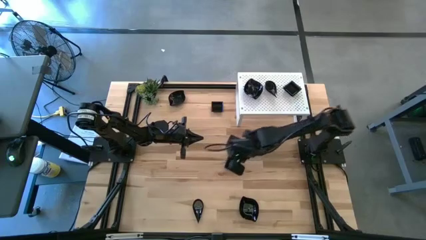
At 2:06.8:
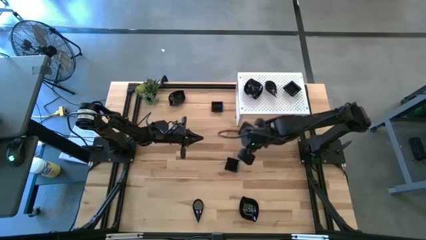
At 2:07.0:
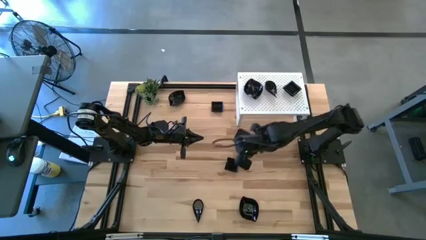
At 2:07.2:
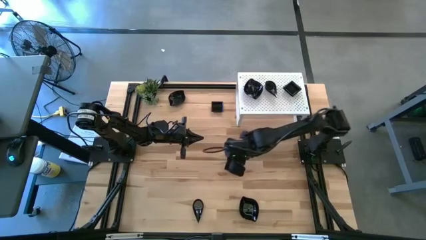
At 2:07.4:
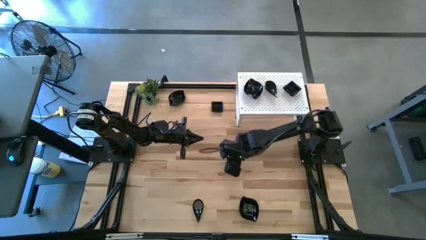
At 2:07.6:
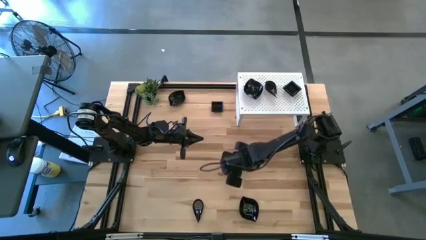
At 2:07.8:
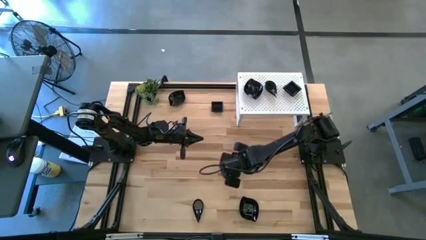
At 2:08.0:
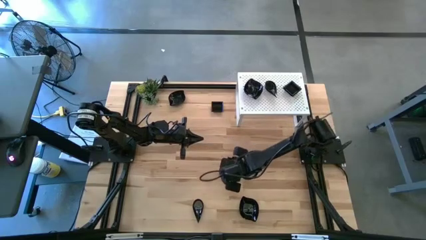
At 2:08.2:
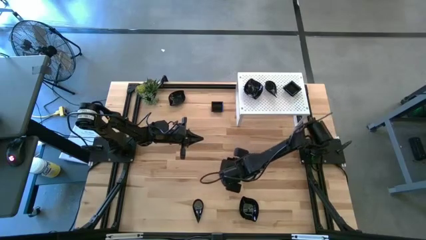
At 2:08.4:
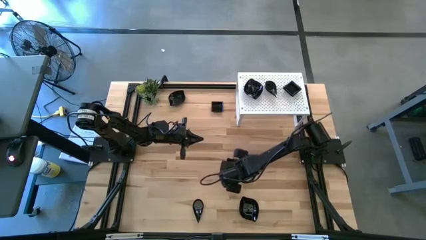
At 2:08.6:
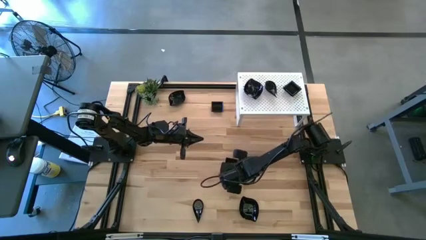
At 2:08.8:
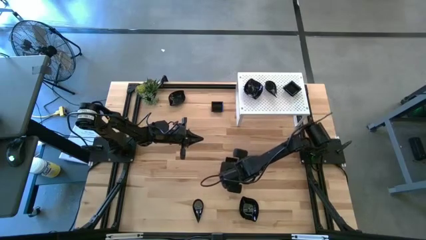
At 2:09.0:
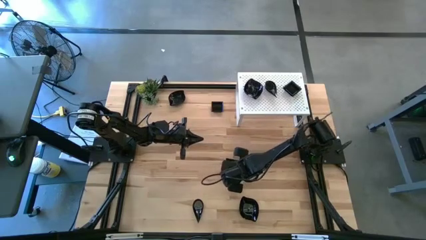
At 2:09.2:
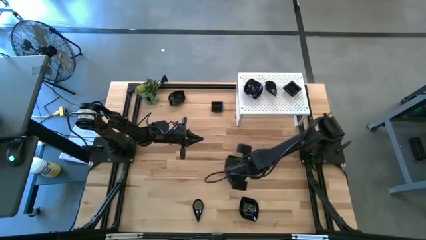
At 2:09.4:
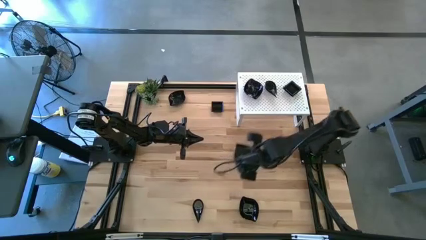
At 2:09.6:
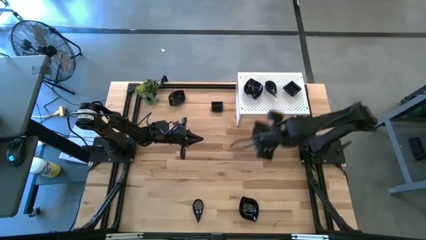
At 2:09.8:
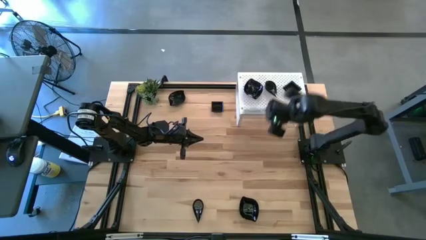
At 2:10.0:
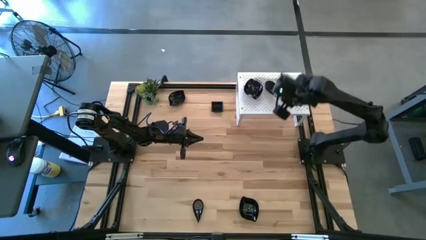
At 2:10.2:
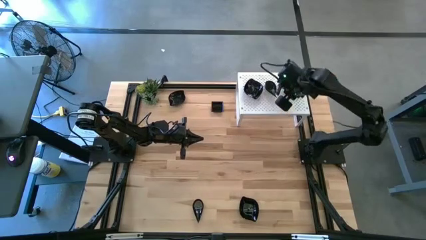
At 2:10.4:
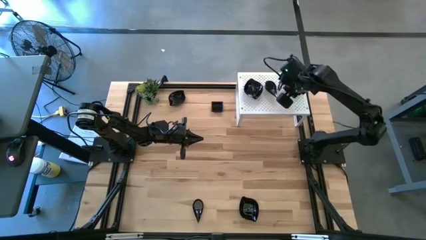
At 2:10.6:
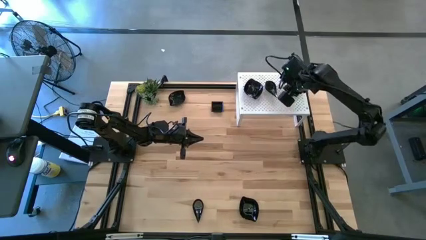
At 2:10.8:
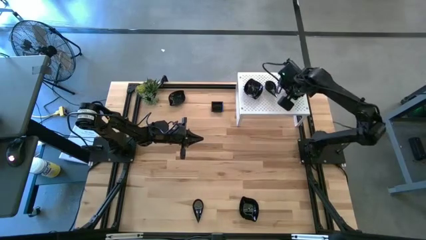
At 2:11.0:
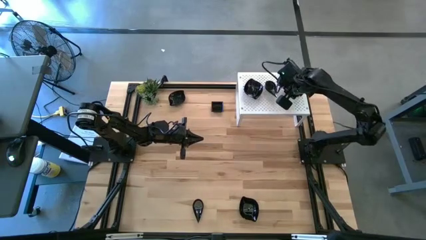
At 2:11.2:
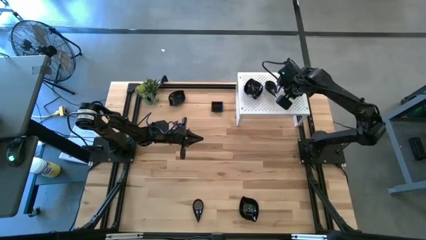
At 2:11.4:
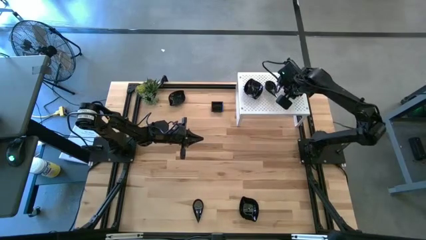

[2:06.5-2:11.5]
Task: Pick & Place Mini shaped plates
Stack the black square plate on top of the black square plates on the shelf

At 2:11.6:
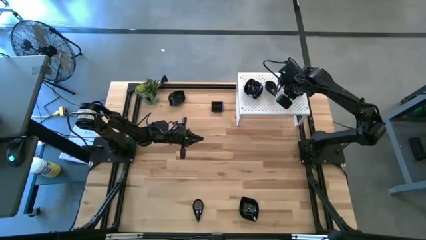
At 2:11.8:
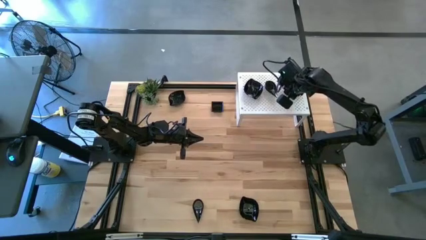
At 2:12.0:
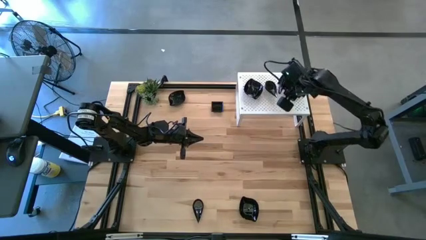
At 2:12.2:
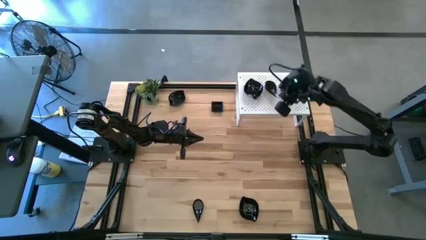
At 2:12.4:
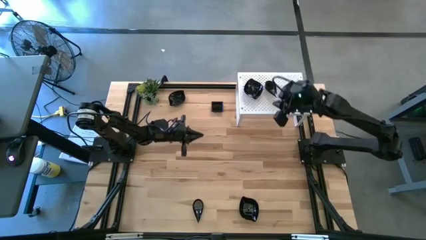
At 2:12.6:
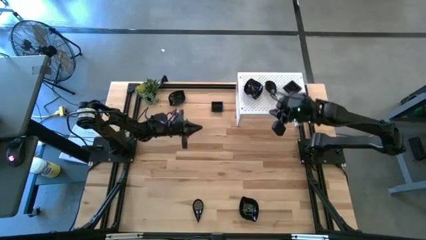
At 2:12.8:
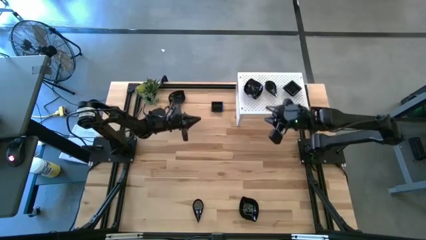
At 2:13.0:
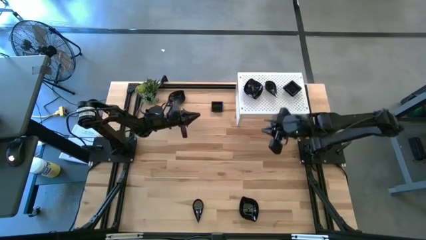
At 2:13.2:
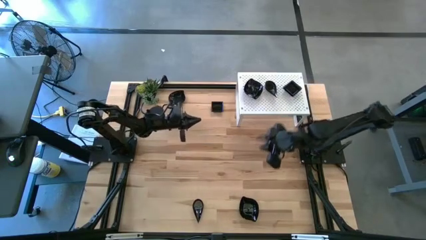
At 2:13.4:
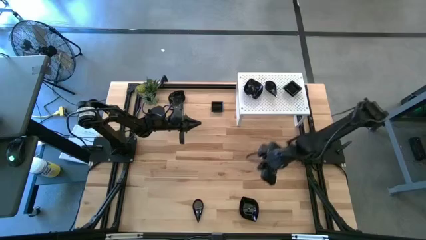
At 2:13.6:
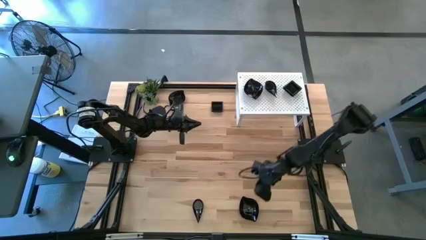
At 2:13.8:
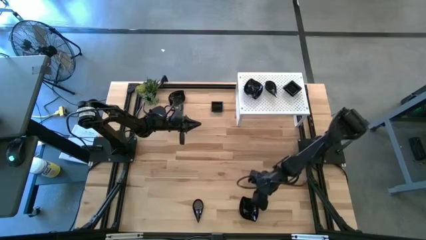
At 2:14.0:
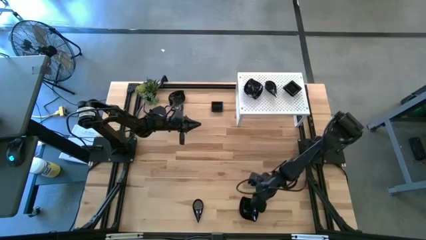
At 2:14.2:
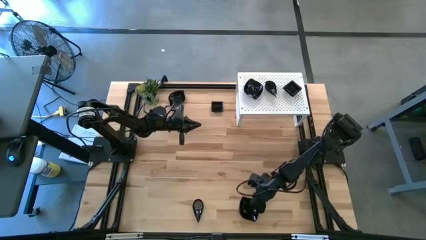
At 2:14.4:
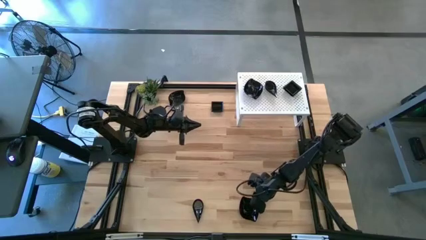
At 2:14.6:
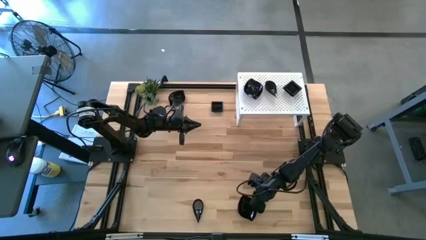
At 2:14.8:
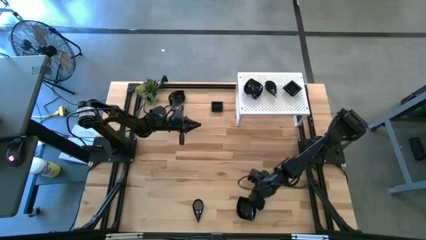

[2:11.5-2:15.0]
Stack the black leaf-shaped plate on top of the black leaf-shaped plates on the shelf

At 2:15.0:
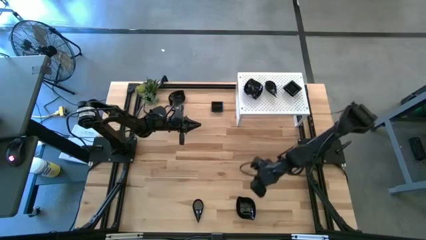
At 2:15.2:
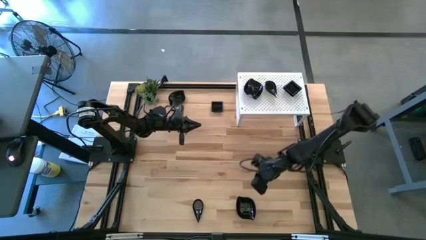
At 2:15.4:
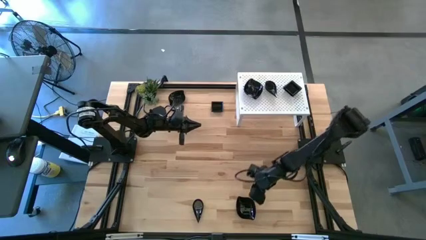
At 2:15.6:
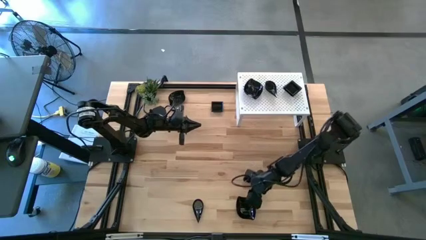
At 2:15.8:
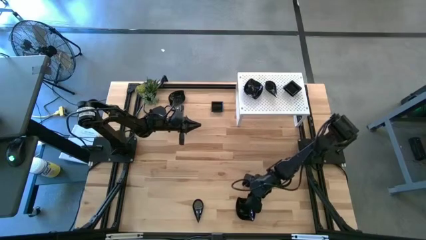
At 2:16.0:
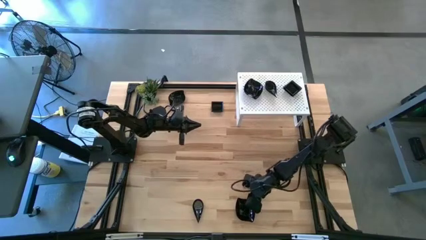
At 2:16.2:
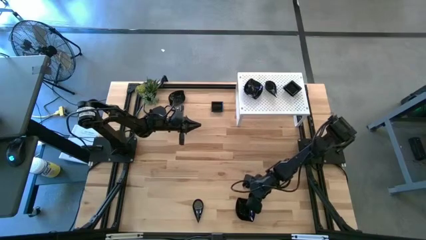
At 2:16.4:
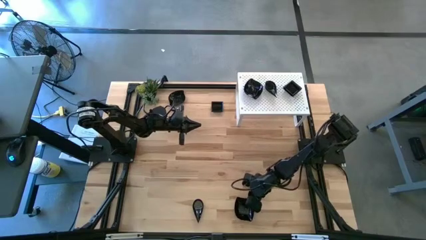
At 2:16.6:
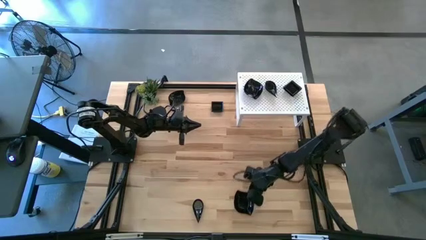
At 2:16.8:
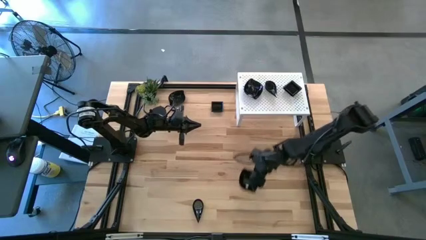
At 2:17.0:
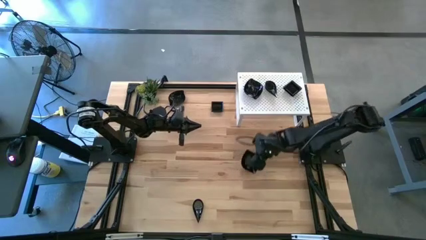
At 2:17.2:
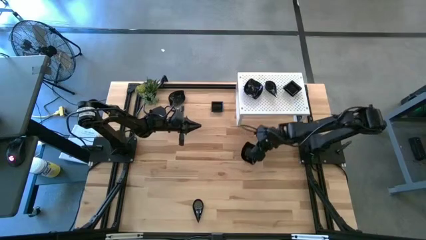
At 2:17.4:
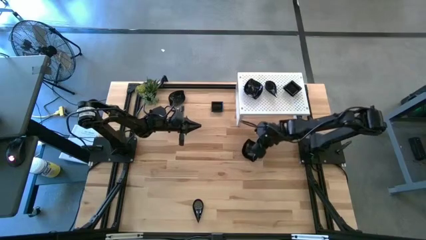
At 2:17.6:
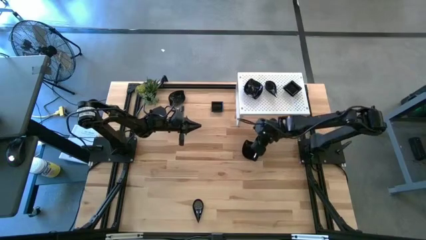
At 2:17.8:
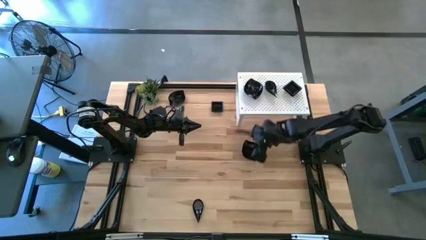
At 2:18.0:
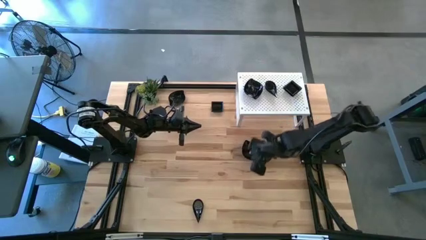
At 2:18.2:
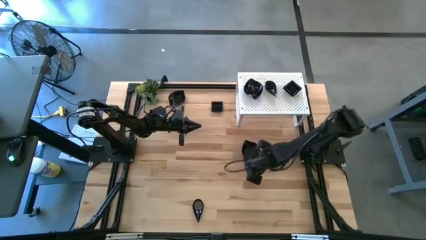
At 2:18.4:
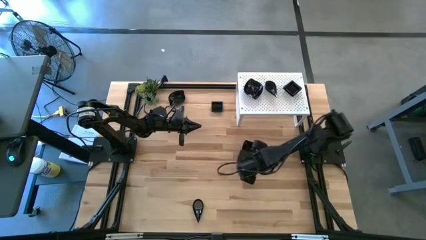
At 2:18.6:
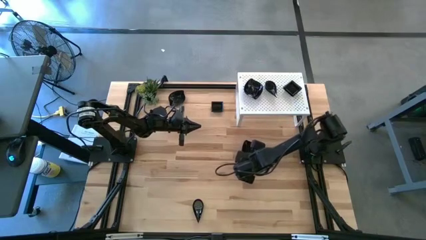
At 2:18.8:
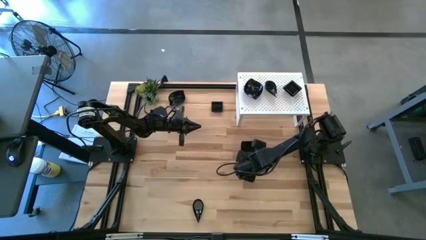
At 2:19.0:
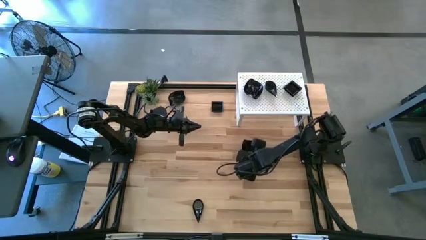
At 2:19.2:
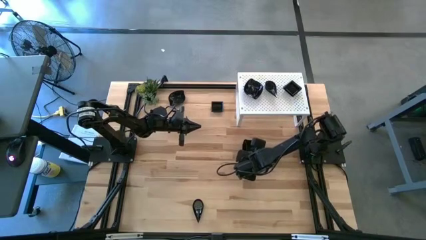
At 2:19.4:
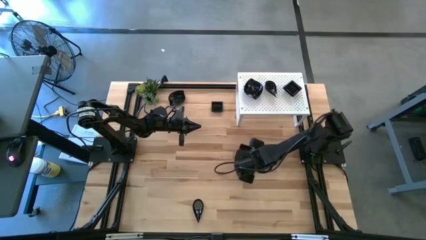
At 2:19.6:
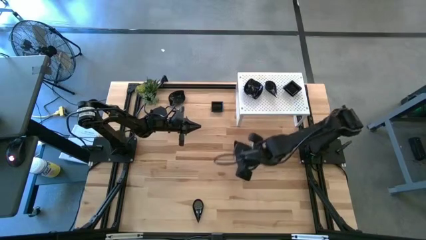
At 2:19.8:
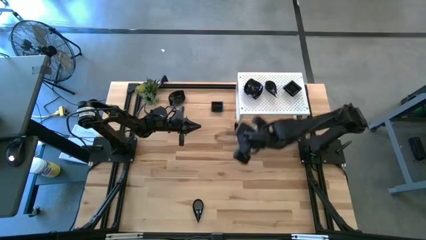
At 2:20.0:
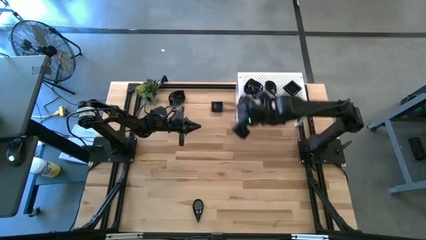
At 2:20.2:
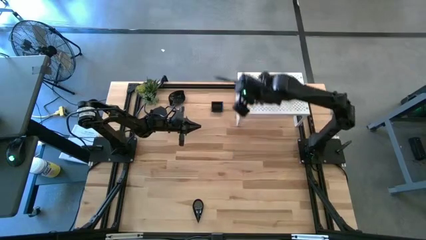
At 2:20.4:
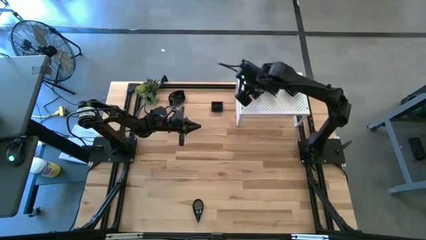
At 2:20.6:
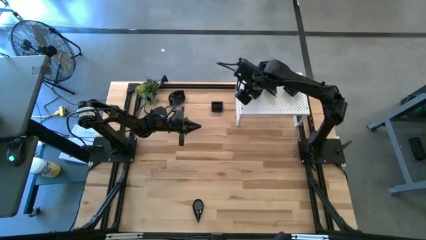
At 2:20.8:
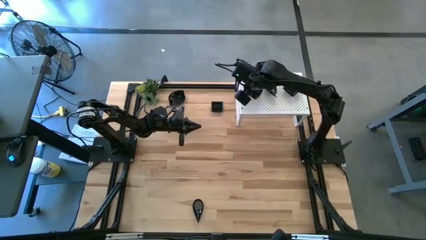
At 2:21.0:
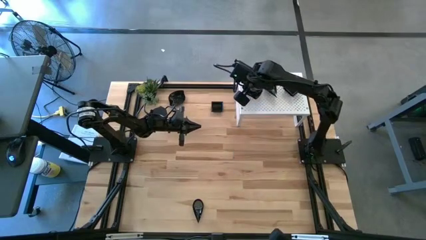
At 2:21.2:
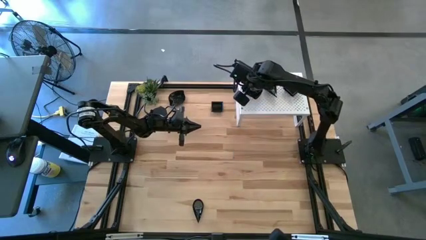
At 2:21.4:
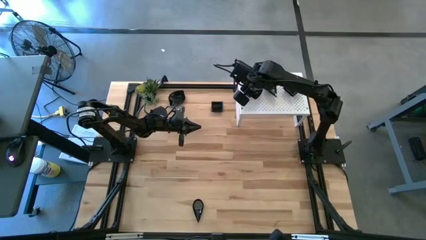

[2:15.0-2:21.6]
Stack the black leaf-shaped plate on top of the black leaf-shaped plates on the shelf

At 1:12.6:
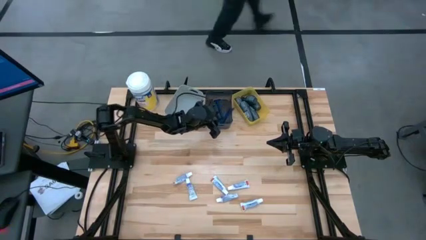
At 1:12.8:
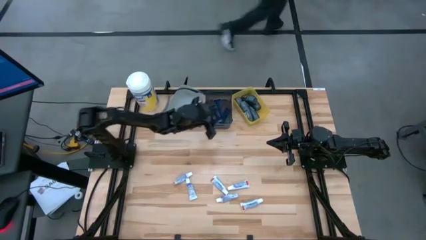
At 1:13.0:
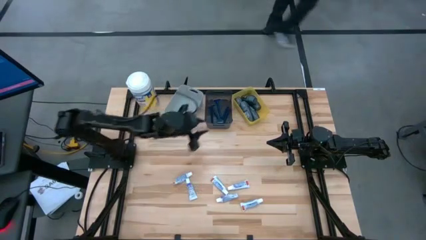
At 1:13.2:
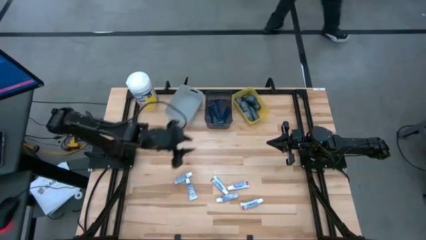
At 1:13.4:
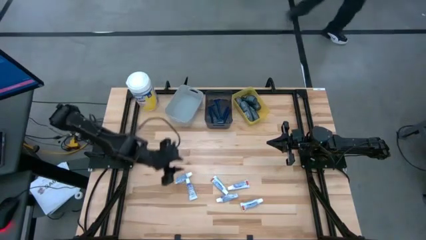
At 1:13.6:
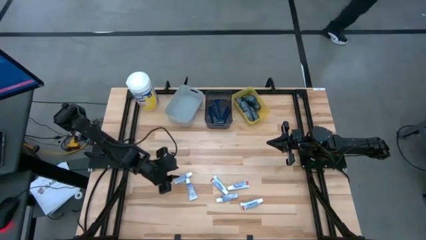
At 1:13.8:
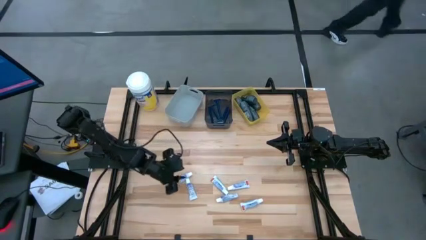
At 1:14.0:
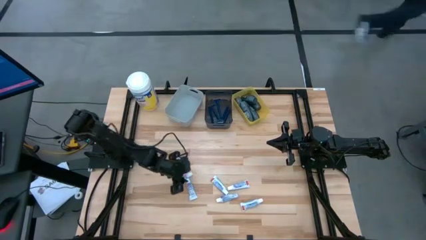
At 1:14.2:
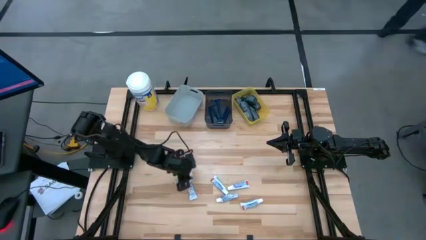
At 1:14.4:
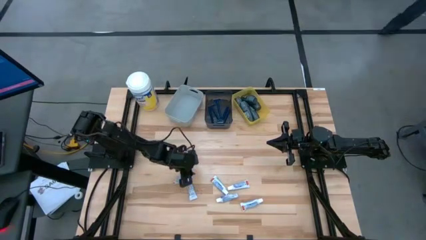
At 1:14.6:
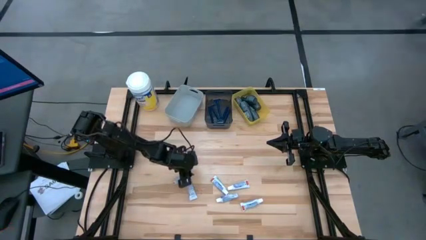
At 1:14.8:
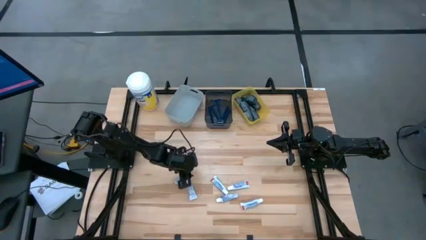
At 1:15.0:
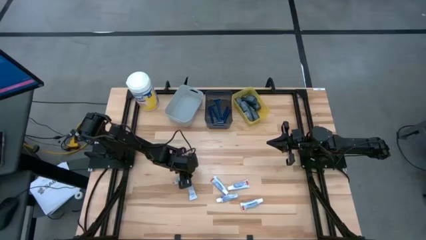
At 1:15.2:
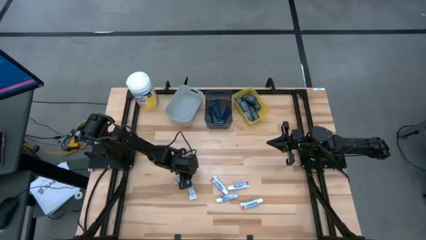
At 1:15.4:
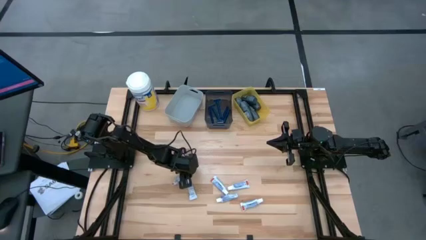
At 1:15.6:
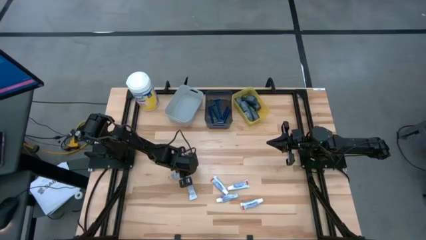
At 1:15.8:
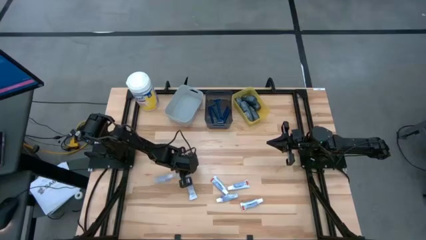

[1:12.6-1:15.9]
Task: Pick & Place Travel size toiletries
Put the toothpaste into the gray bin
